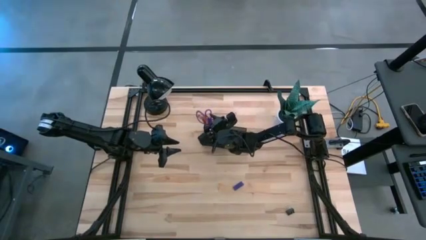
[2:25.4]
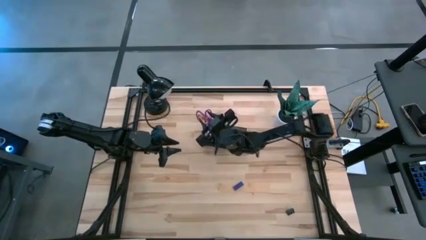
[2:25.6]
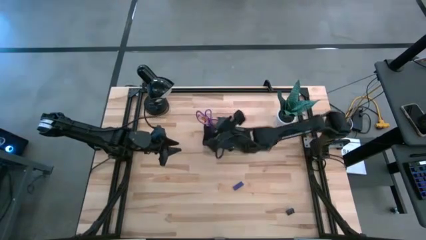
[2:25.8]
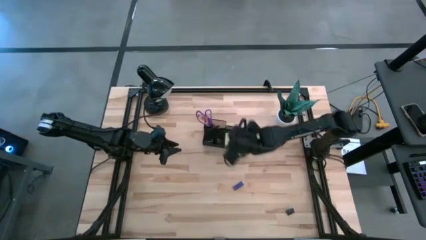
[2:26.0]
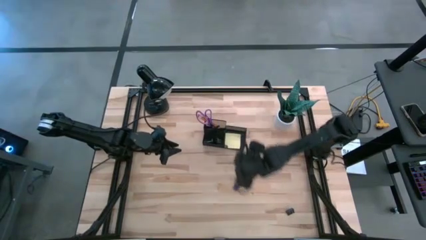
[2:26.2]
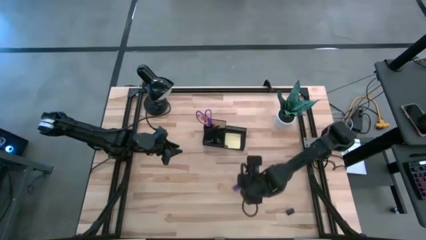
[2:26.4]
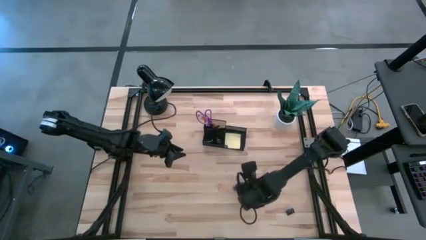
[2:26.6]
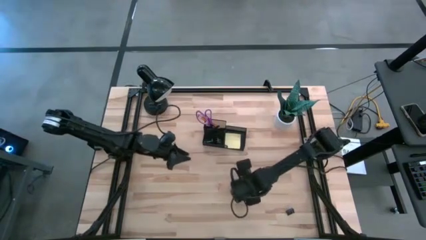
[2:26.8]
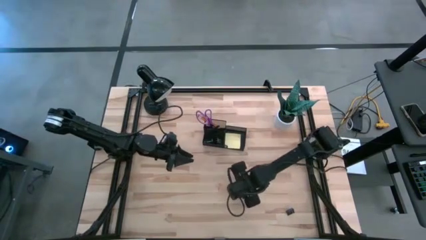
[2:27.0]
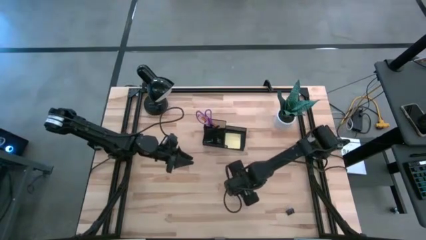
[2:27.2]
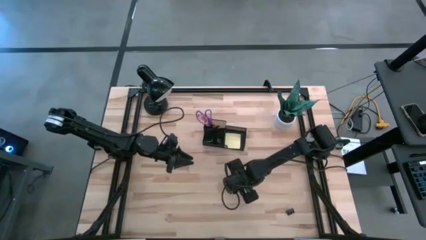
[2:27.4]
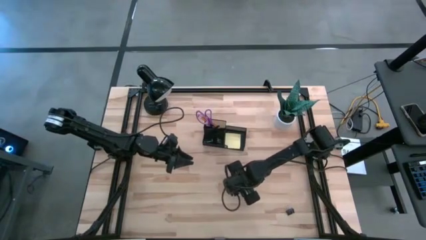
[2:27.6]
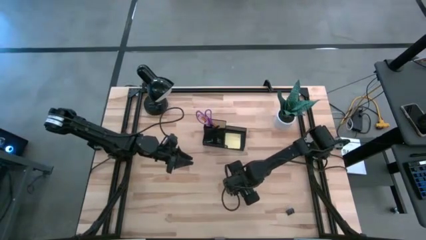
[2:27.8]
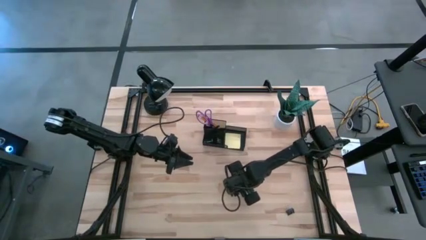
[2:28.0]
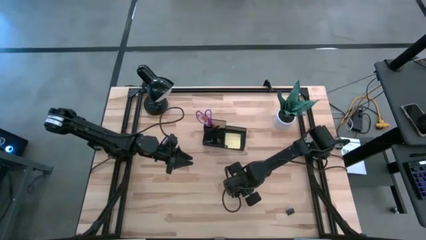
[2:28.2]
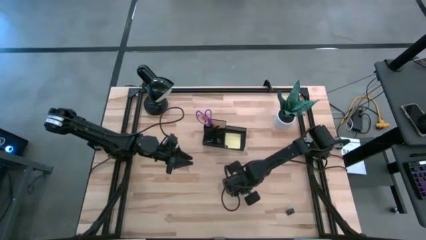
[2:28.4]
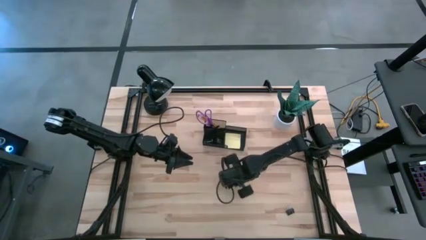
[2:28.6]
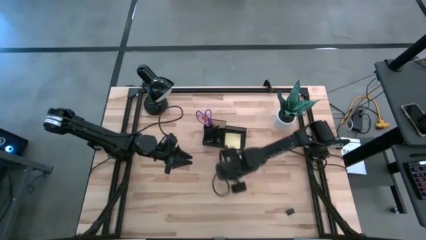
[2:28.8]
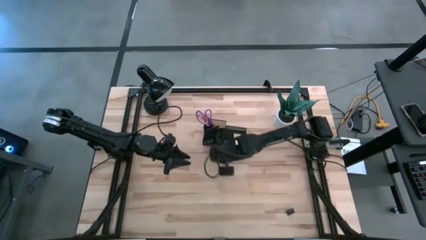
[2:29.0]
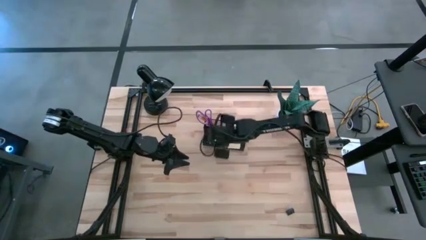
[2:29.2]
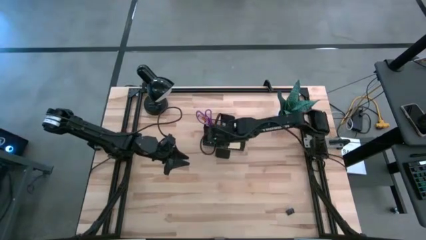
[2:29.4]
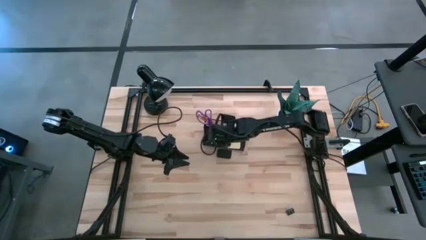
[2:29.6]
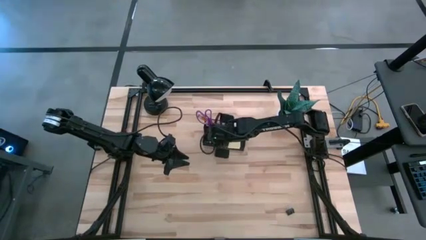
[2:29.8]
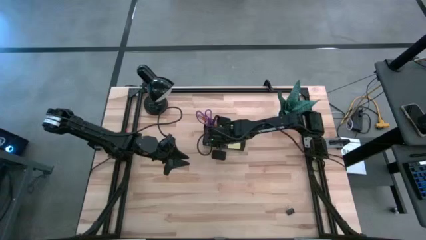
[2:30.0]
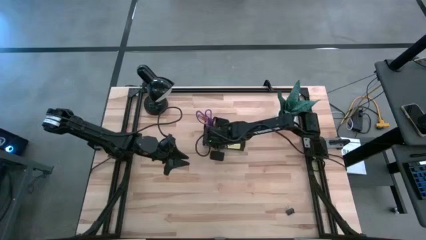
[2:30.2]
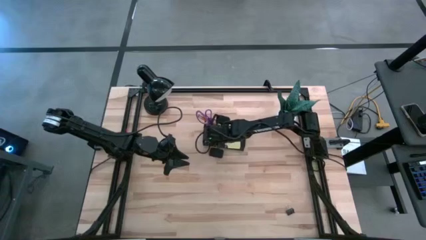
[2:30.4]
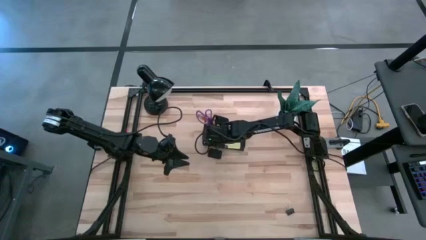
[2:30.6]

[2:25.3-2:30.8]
Task: Pick and place office supplies into organizer
Put the blue eraser into the black desk organizer

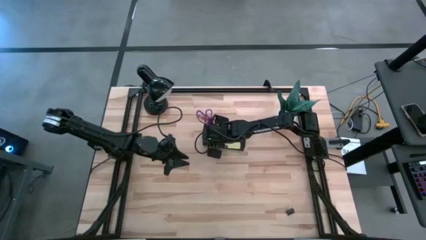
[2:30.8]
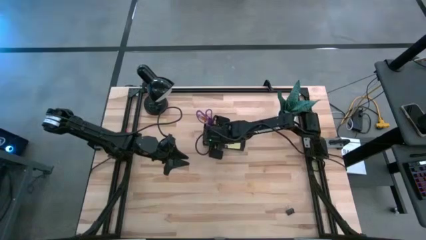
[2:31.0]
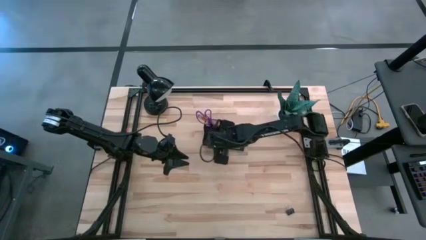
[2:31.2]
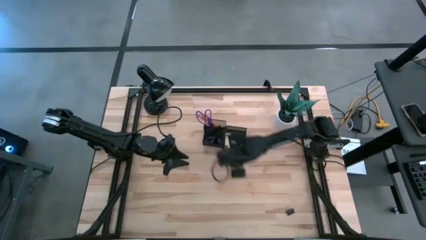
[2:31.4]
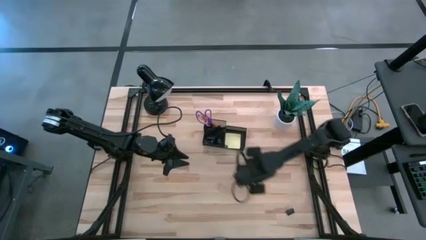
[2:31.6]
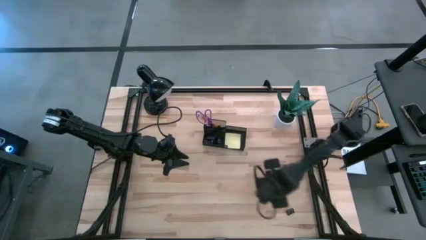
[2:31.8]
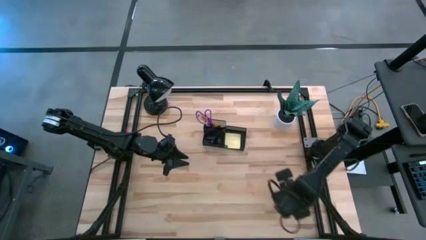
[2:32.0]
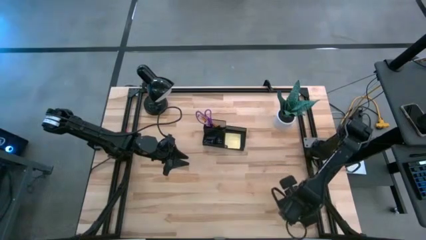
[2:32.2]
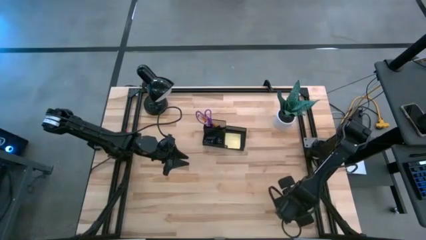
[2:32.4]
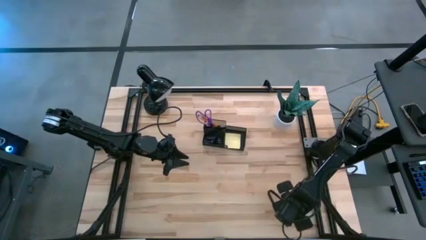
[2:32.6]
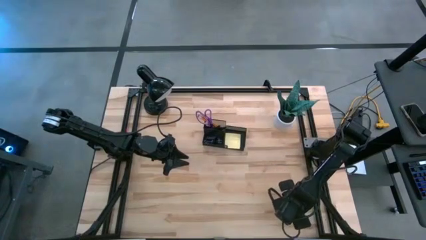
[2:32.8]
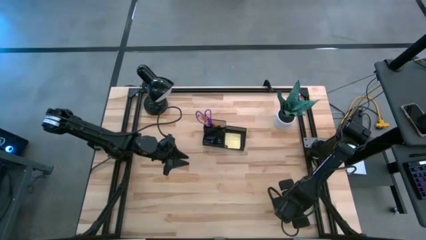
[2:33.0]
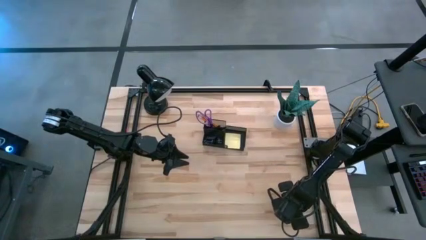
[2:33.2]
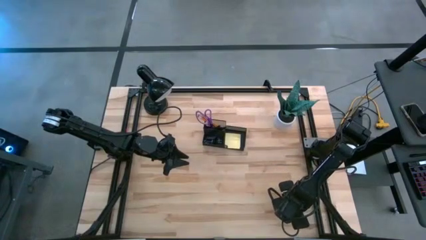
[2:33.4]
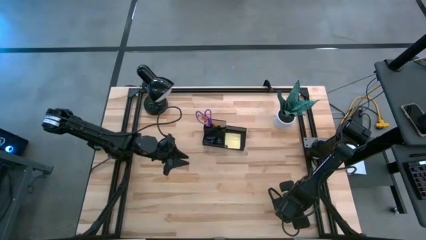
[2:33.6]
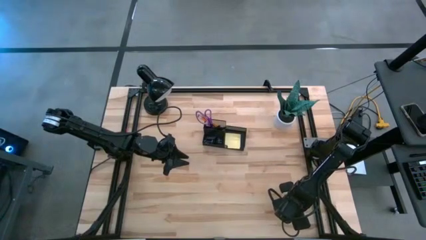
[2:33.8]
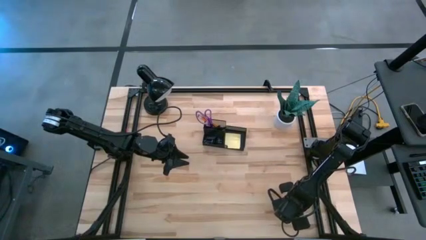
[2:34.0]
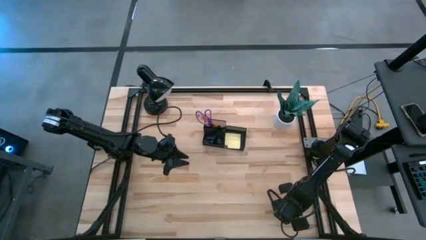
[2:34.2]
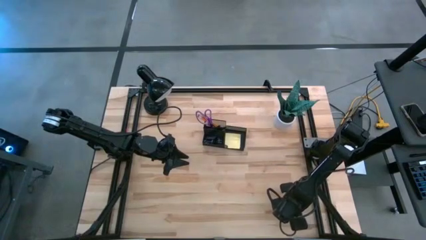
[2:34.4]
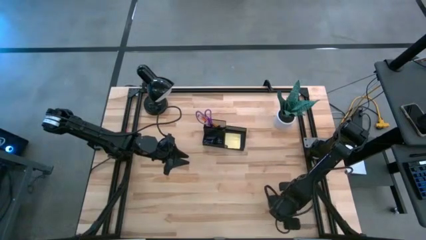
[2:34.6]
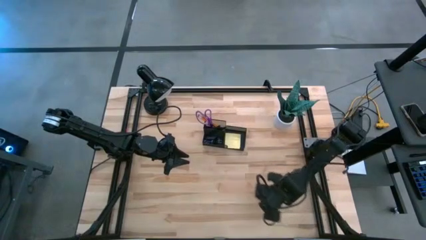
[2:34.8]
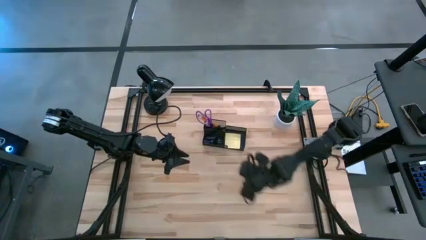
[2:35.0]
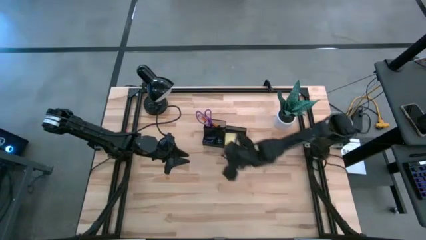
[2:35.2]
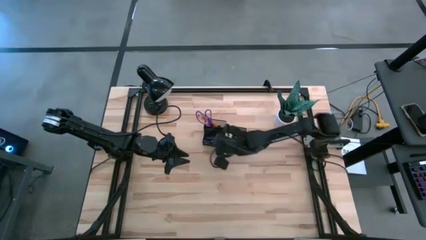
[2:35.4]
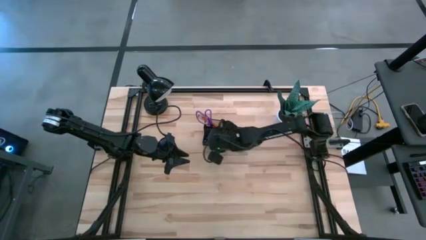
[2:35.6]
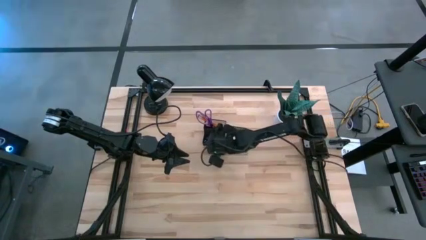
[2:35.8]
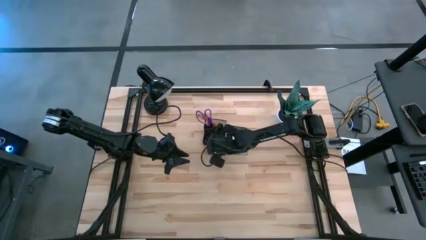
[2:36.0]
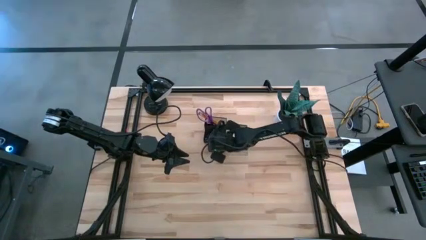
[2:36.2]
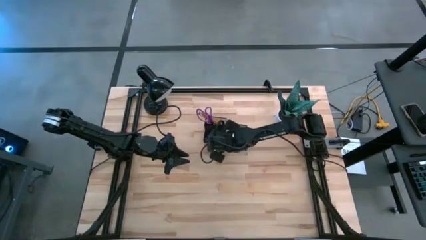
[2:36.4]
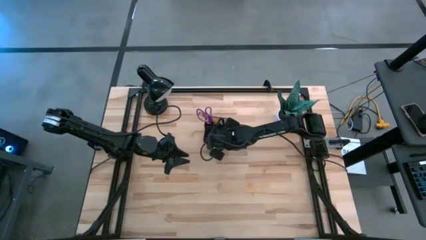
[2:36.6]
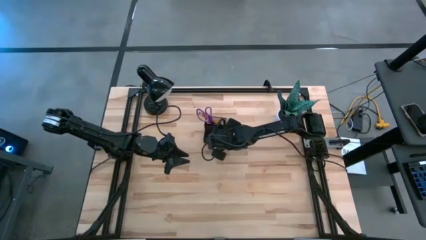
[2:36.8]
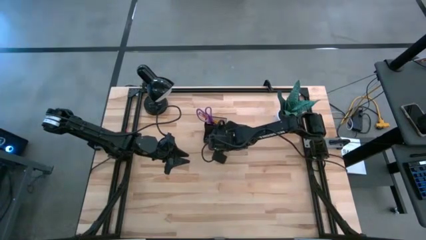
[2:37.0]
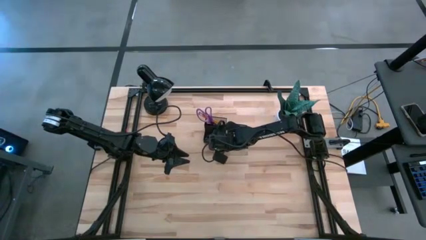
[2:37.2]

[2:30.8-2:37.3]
Put the black binder clip into the black desk organizer

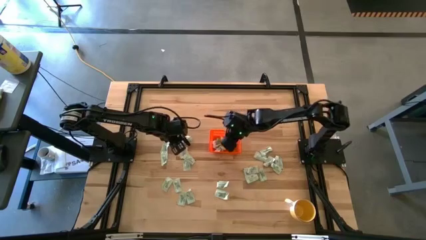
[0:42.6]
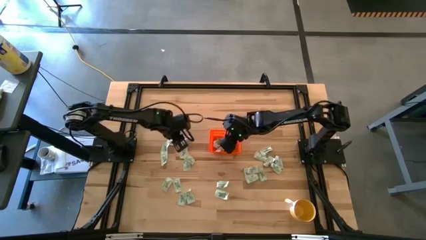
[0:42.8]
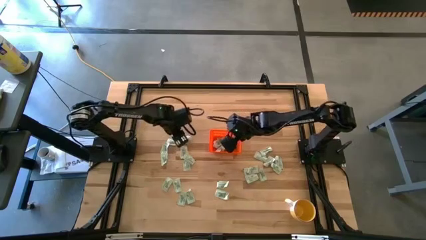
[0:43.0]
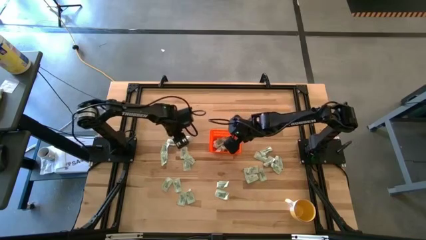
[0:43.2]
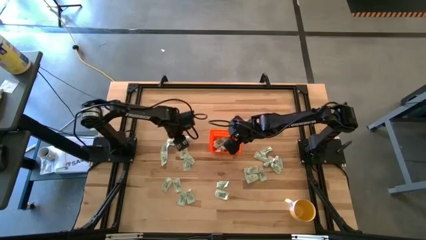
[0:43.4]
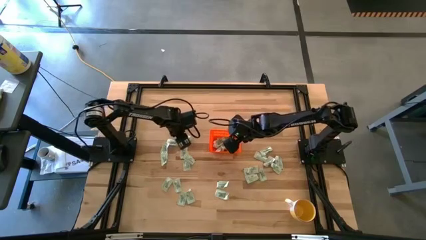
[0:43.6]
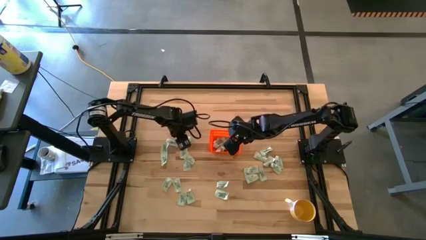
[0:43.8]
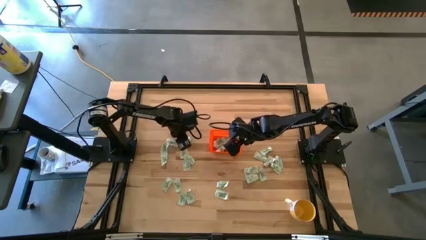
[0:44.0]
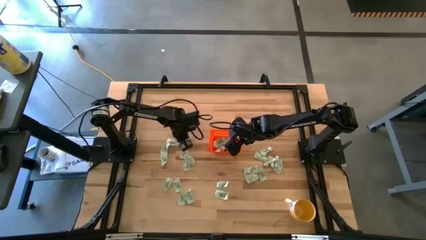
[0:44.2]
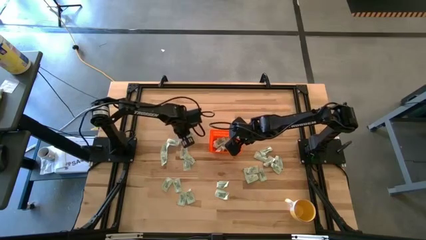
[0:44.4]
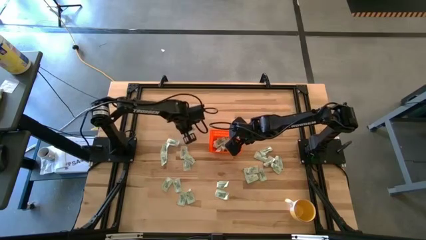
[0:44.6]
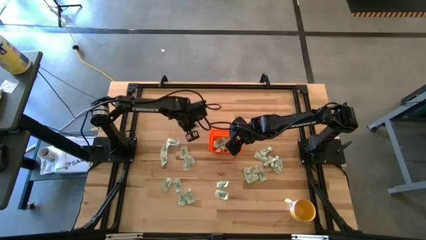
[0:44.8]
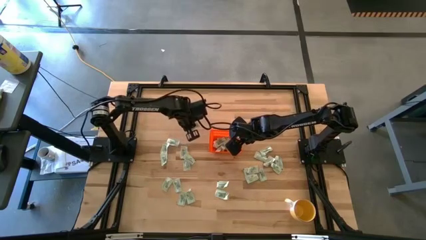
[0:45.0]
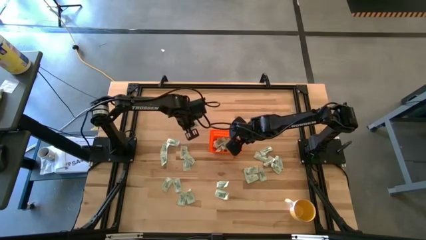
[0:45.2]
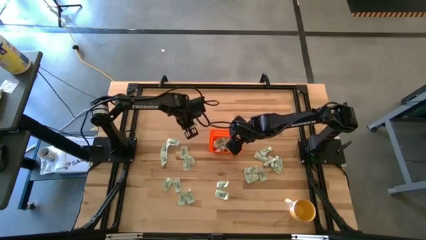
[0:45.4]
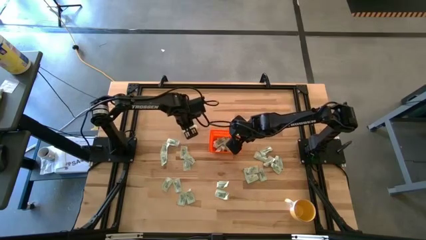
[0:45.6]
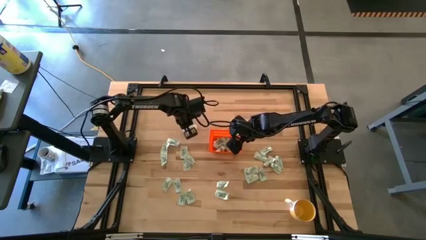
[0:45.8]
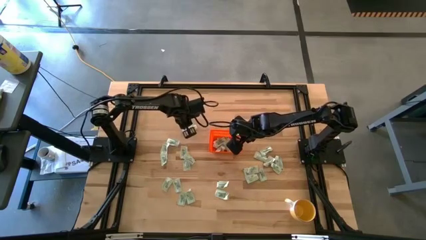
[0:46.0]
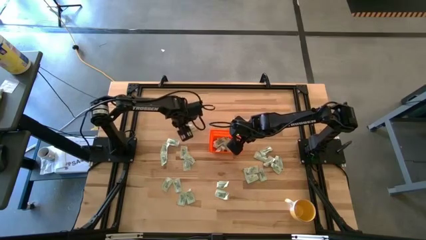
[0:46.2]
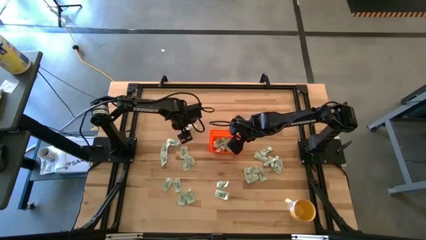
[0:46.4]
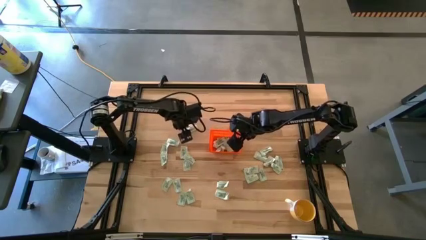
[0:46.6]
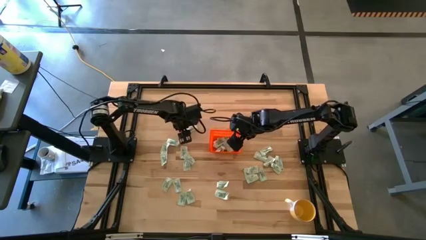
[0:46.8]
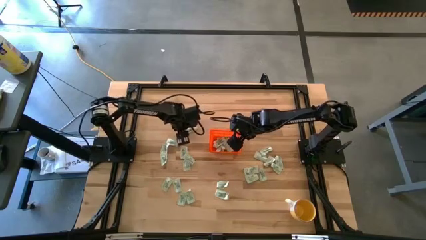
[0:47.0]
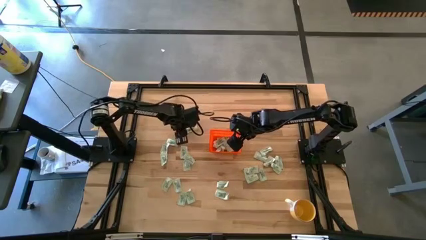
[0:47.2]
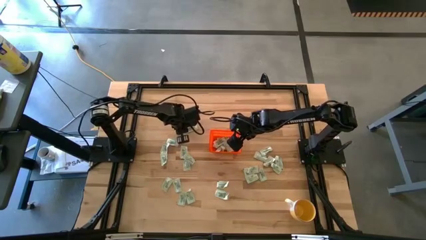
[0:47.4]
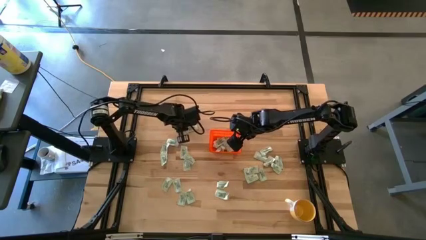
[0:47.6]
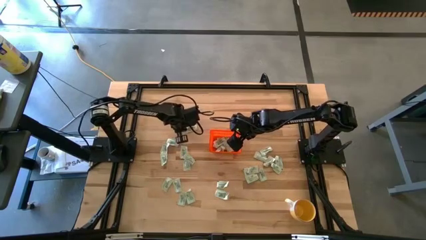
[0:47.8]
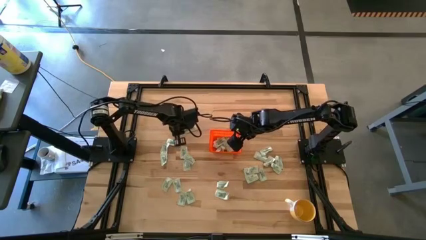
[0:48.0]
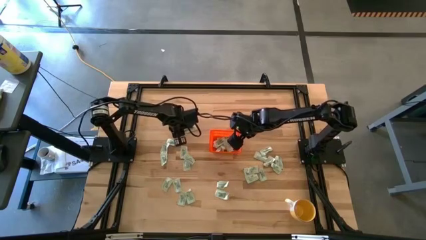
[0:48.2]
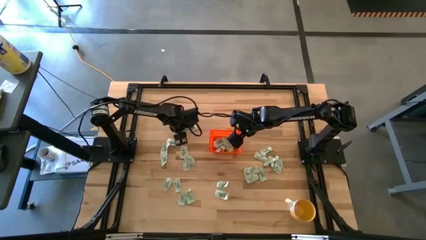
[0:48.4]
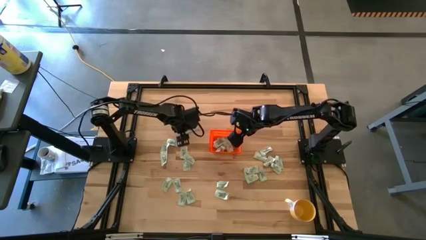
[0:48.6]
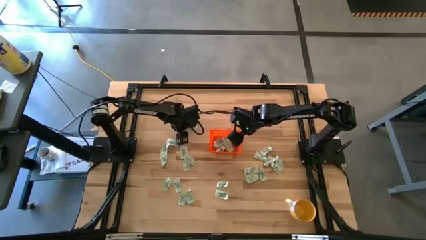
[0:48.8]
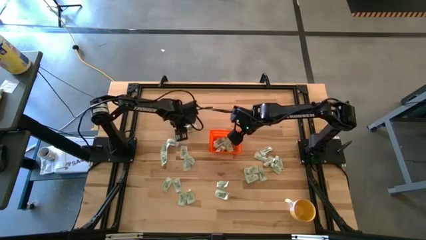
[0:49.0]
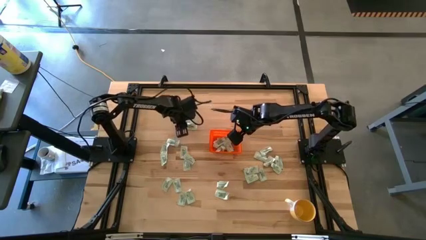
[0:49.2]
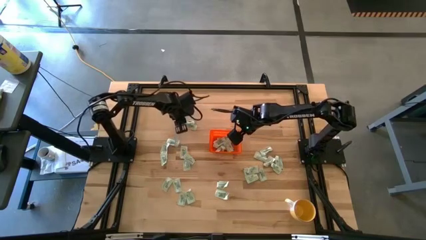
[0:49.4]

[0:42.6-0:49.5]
Task: Pick and place Stevia / Truvia into bins
Put the light green stevia packet into the orange basket
